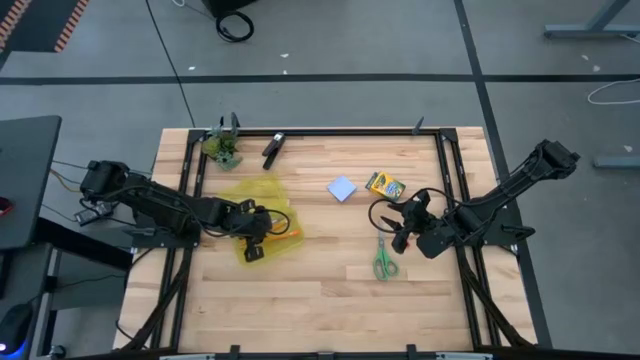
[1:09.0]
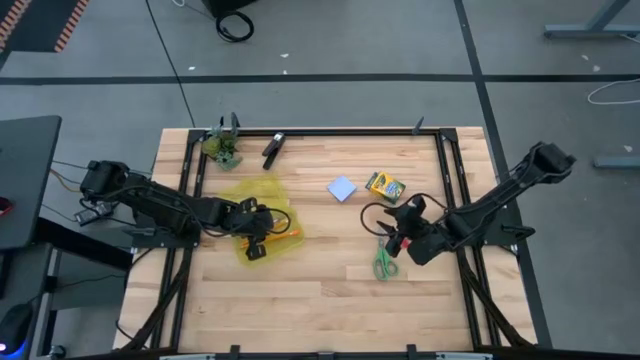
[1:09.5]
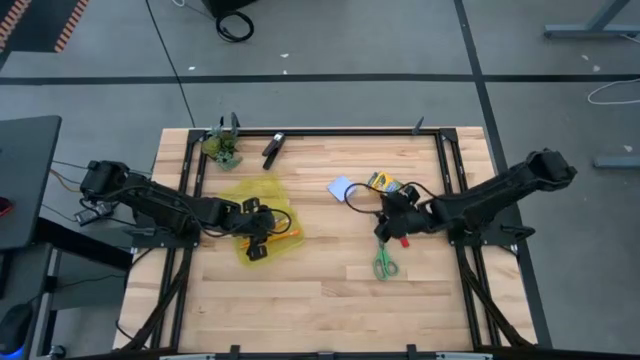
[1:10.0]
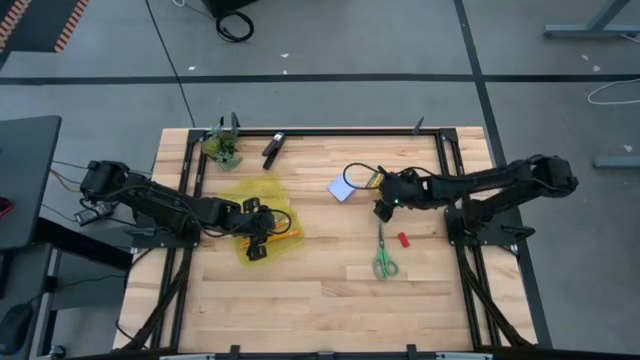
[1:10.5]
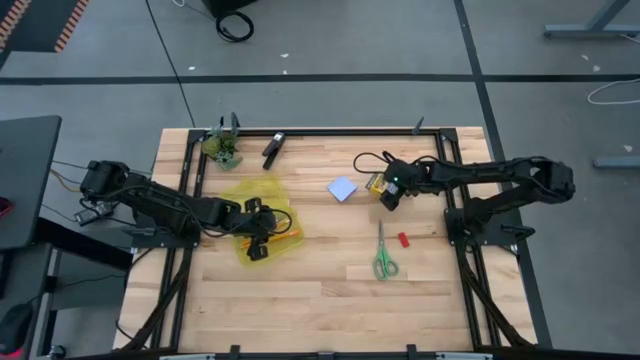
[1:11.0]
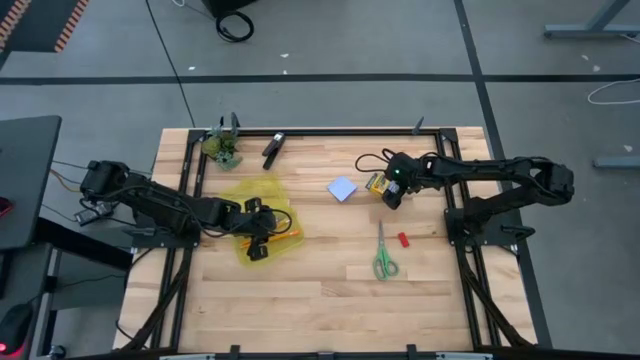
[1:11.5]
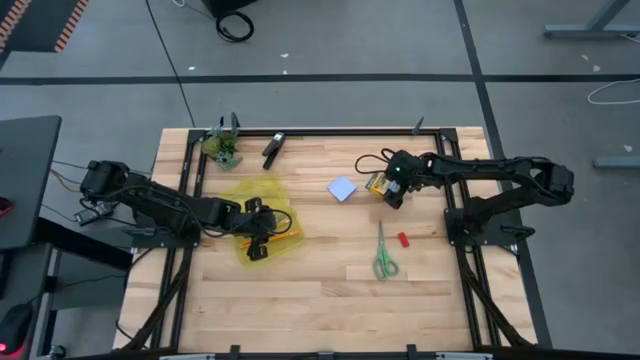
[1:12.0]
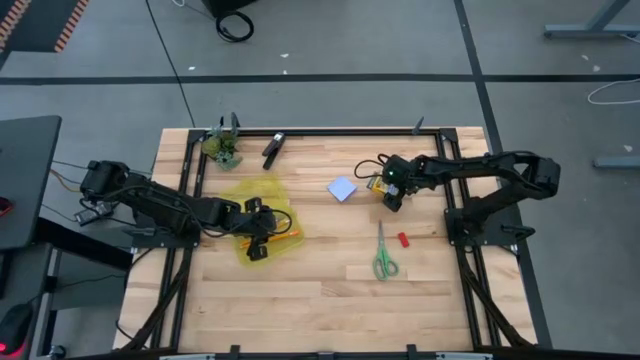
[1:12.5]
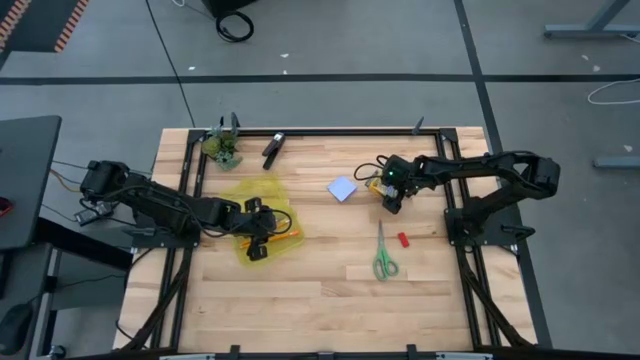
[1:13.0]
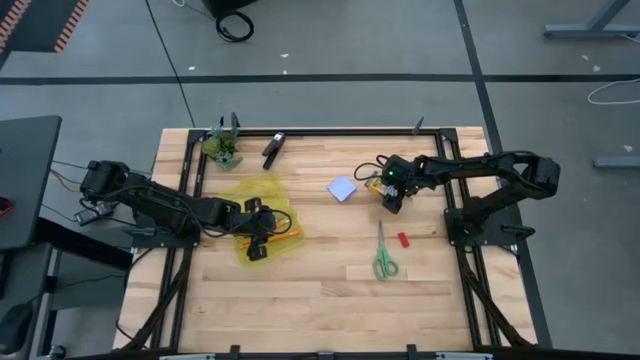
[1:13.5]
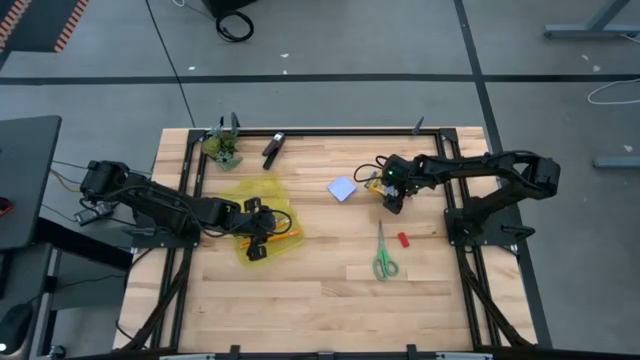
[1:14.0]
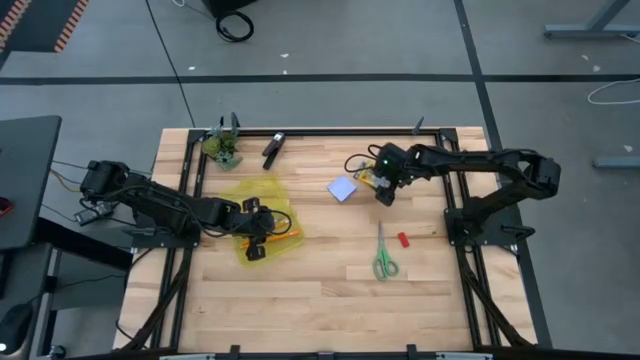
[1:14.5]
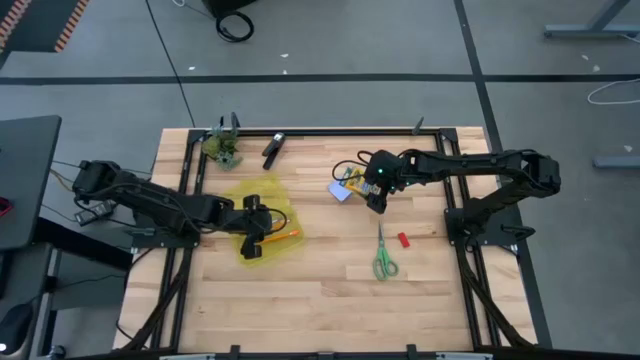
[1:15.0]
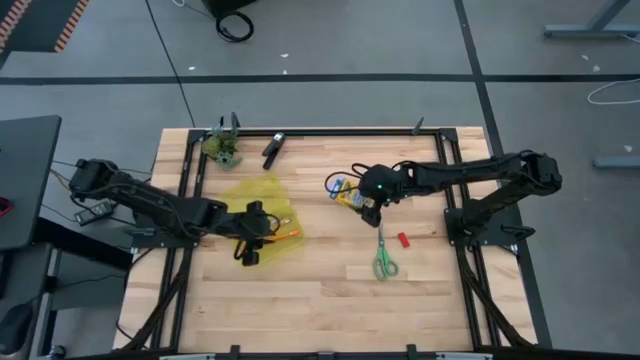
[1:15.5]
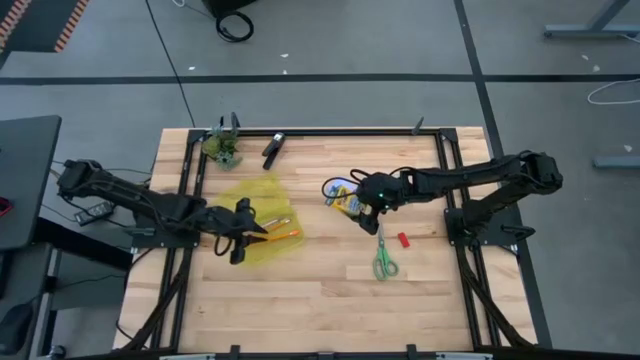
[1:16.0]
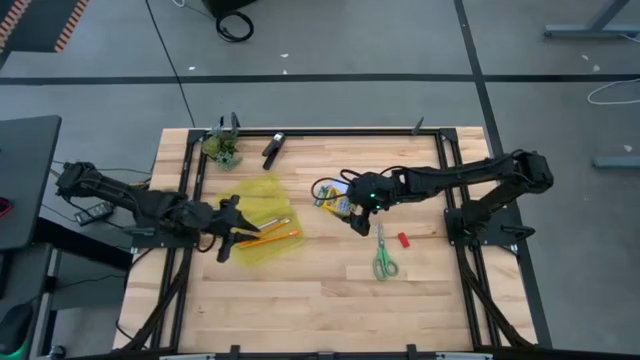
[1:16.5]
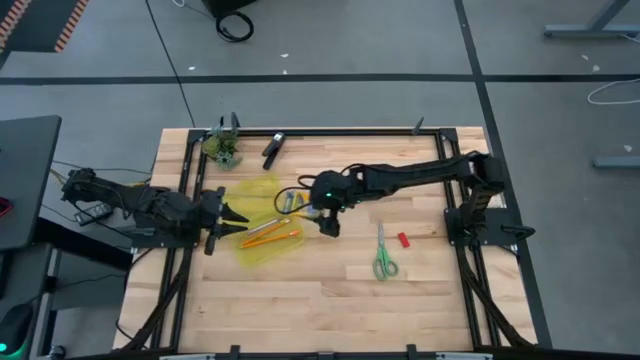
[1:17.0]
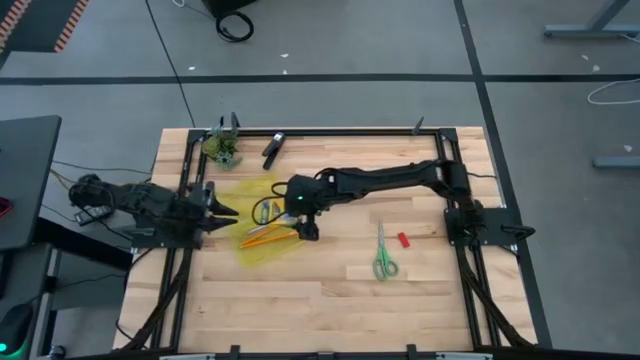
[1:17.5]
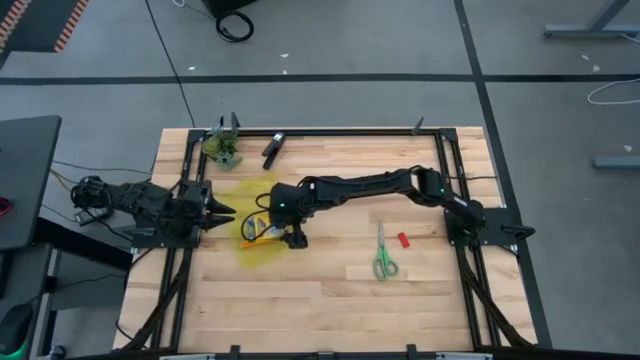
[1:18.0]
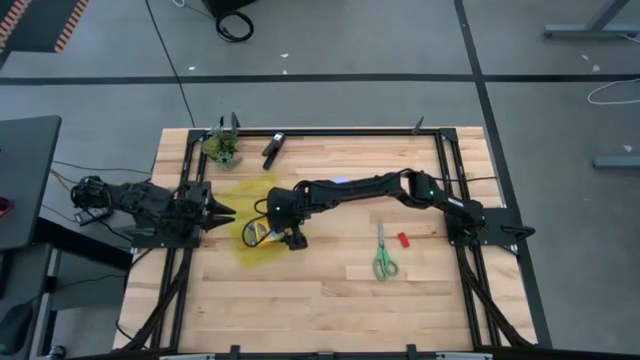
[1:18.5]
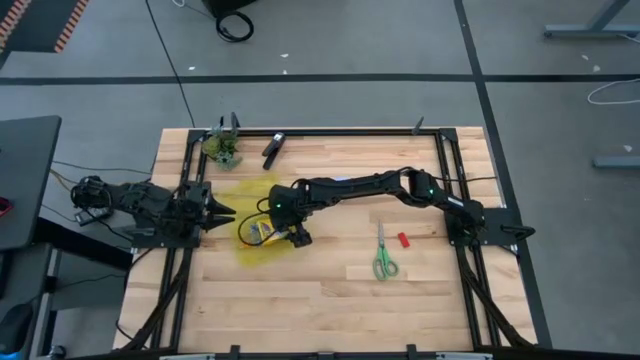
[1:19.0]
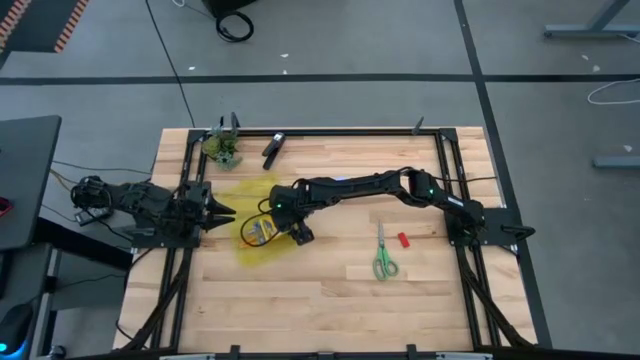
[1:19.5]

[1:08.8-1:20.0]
Task: Pack school essentials
Put the yellow crayon box into the yellow supply box

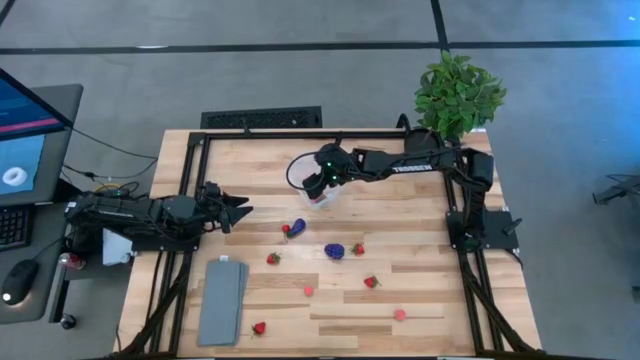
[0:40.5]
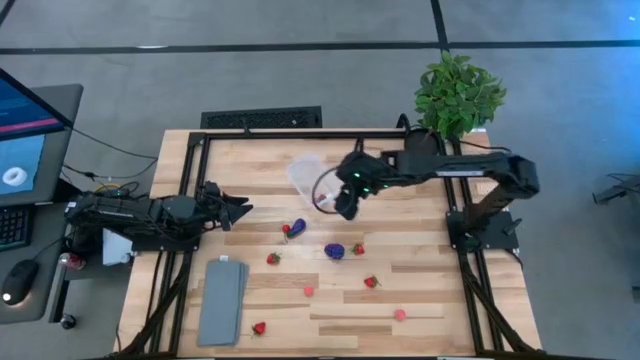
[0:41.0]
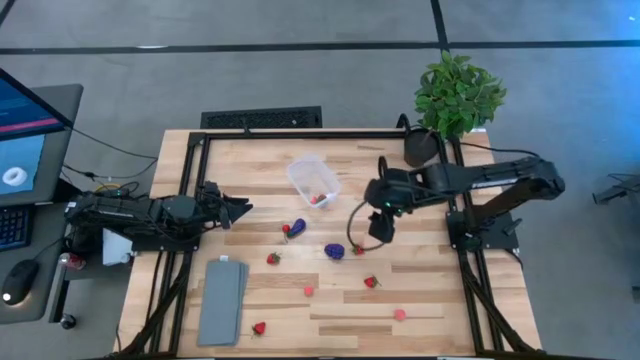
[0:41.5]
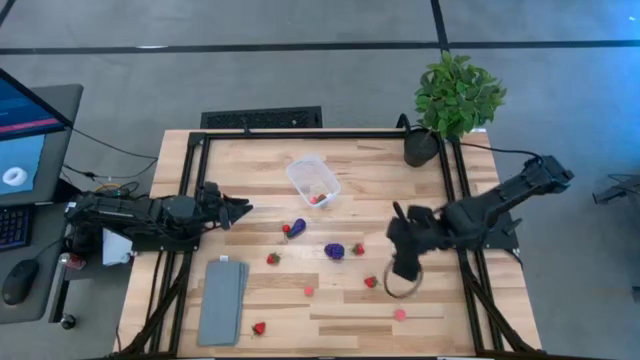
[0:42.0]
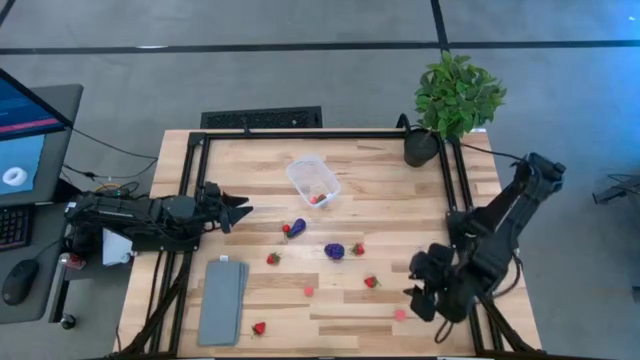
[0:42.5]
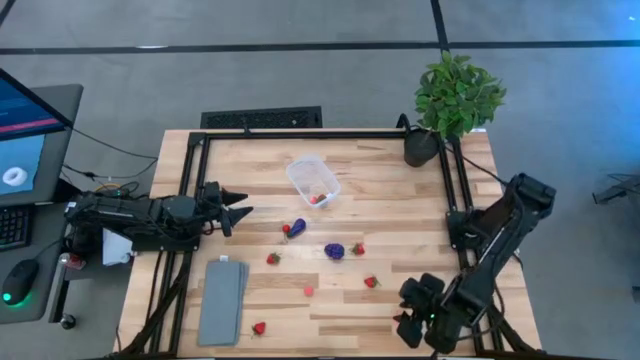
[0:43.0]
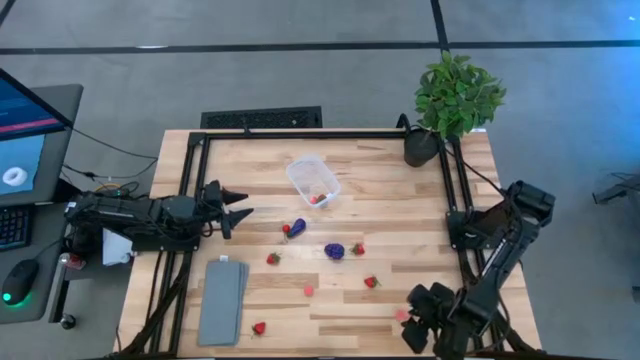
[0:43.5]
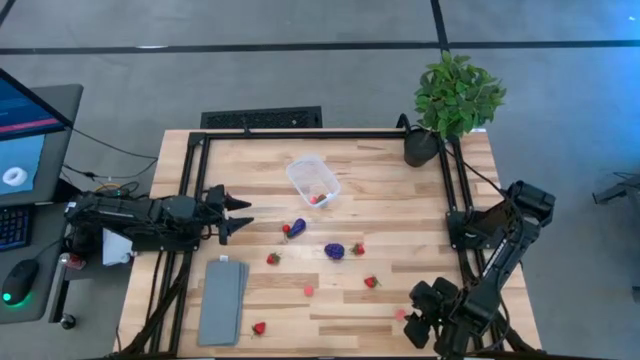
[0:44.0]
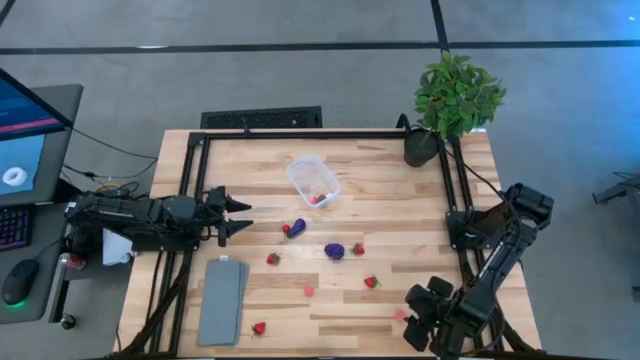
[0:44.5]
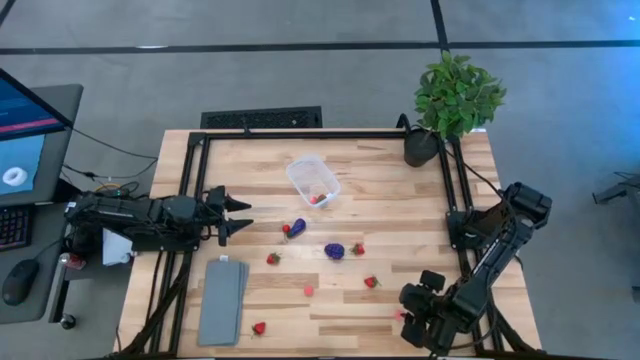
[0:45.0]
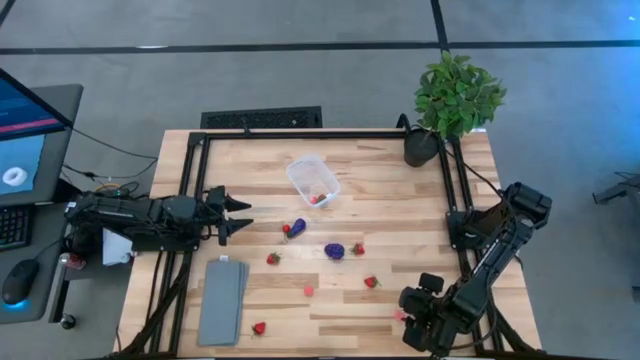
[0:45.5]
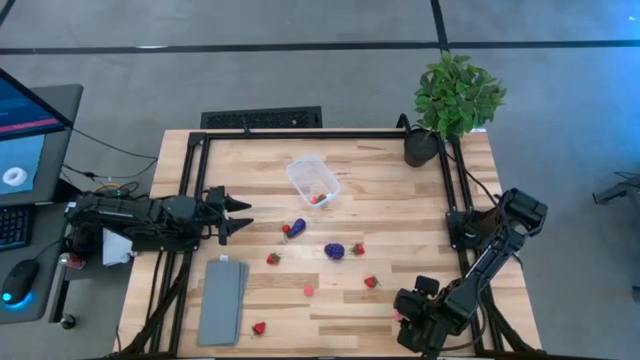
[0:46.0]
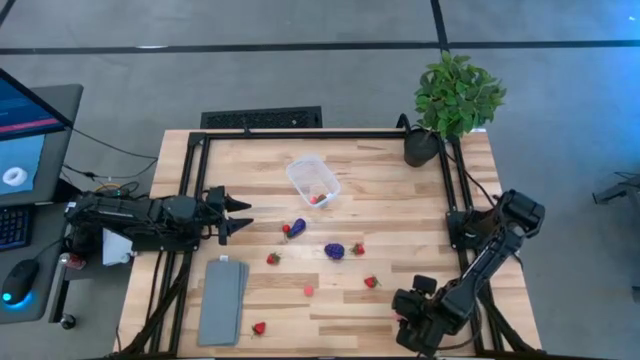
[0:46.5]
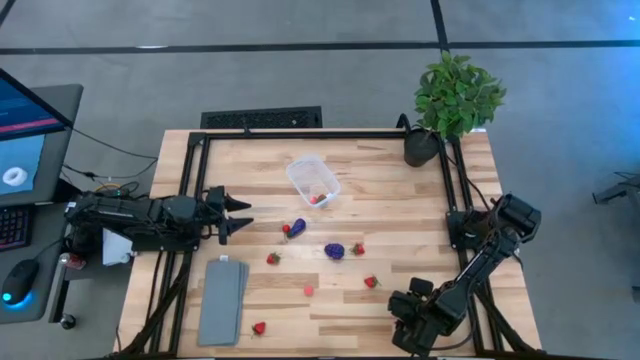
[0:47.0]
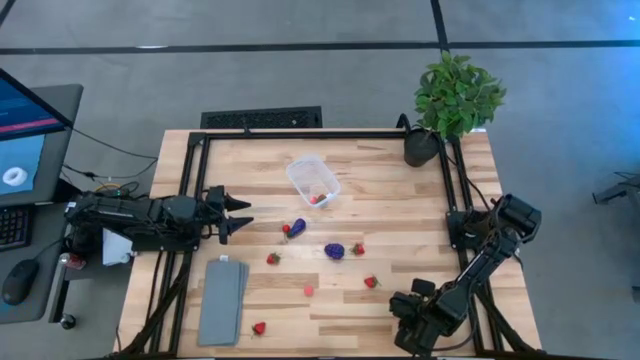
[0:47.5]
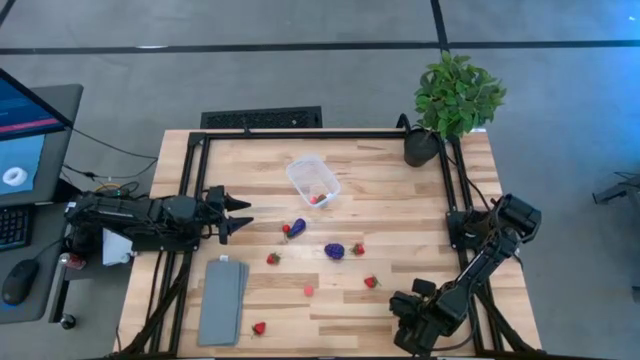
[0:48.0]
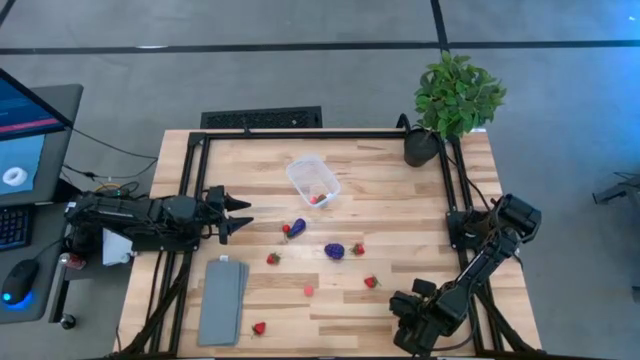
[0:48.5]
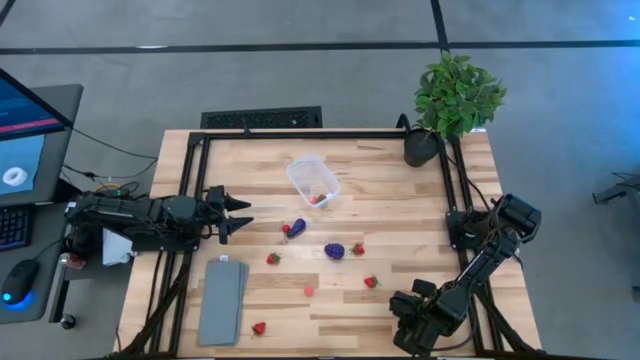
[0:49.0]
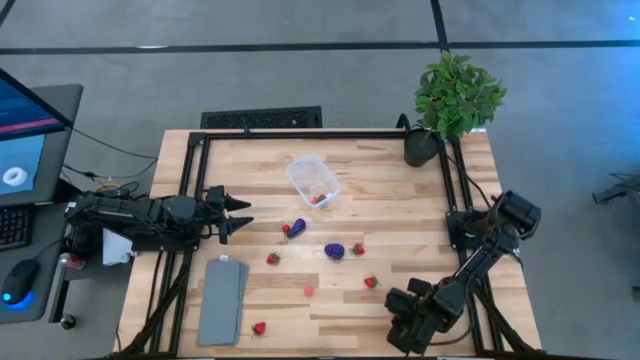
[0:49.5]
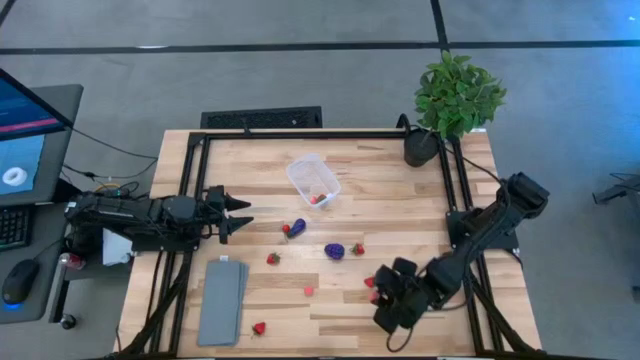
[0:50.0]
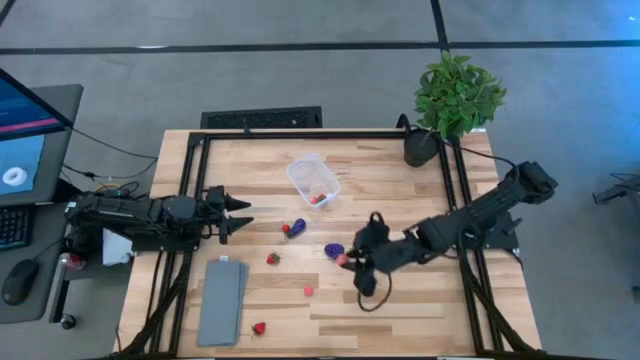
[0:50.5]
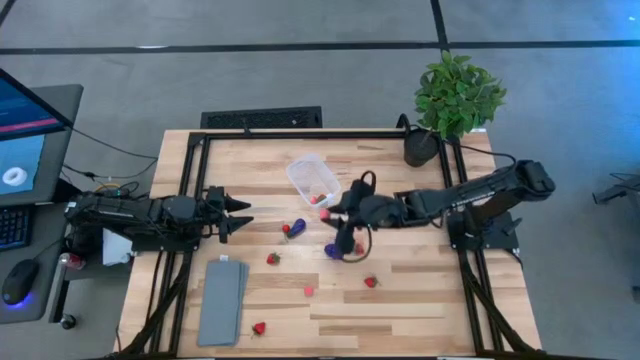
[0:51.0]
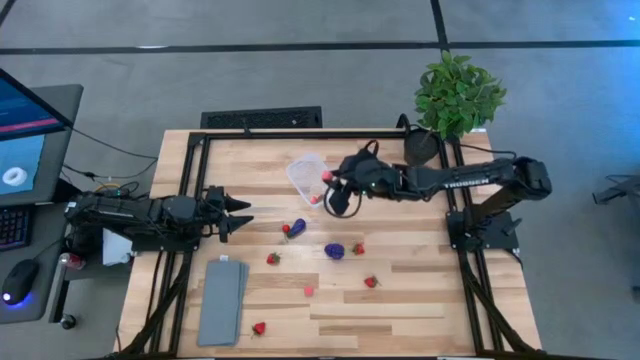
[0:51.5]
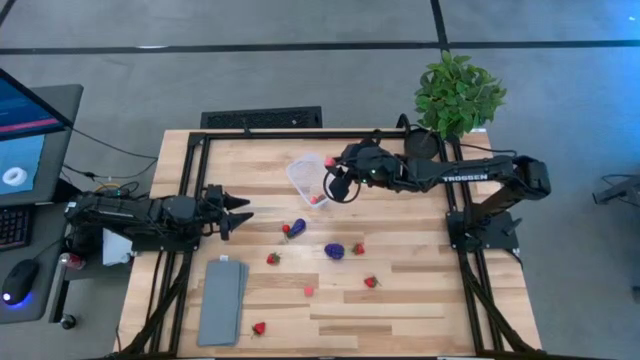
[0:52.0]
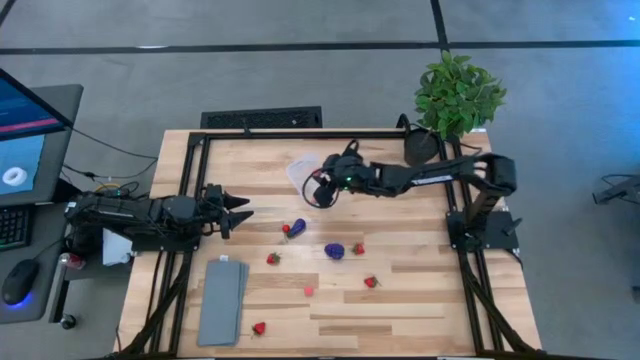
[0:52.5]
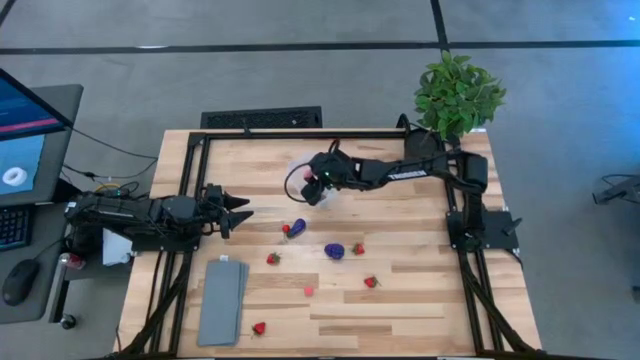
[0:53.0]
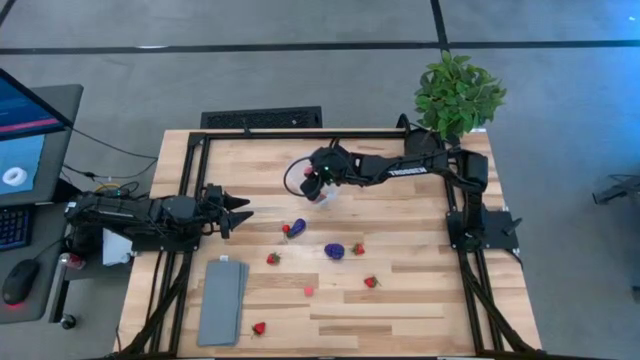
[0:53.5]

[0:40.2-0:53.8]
Task: Pick and placing Produce into tupperware
Put the right peach into the transparent container
